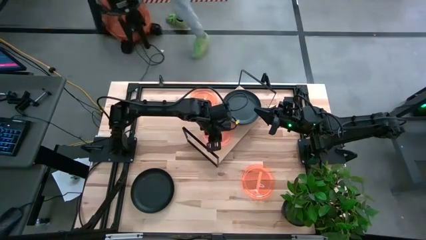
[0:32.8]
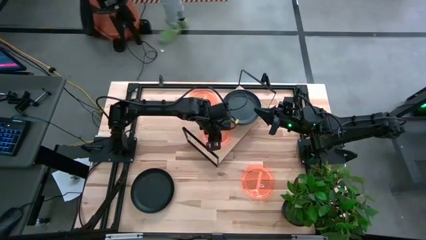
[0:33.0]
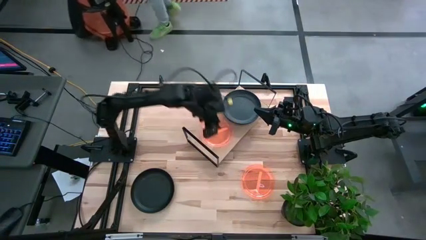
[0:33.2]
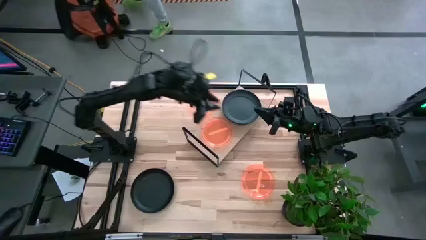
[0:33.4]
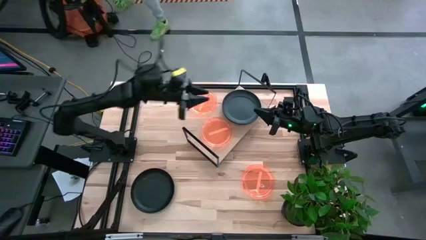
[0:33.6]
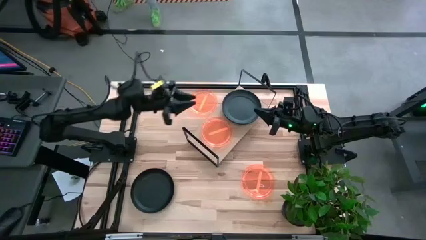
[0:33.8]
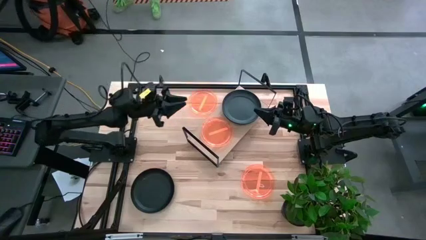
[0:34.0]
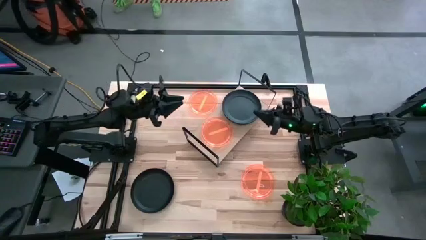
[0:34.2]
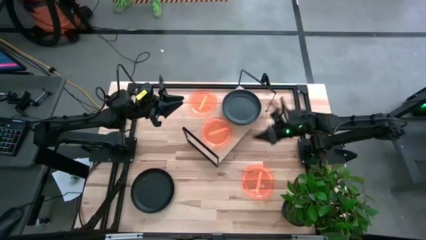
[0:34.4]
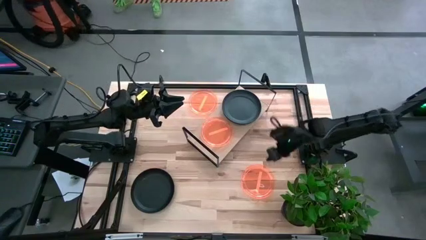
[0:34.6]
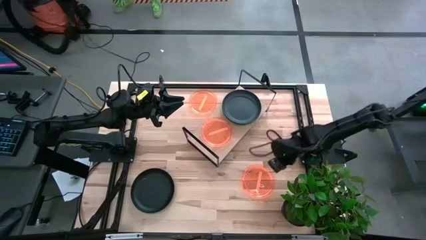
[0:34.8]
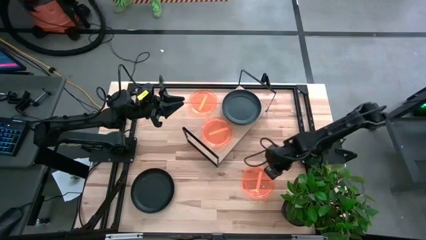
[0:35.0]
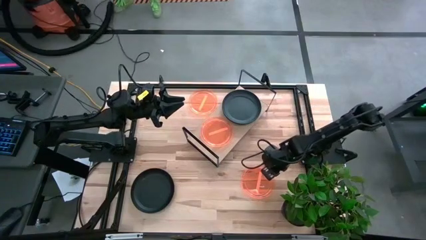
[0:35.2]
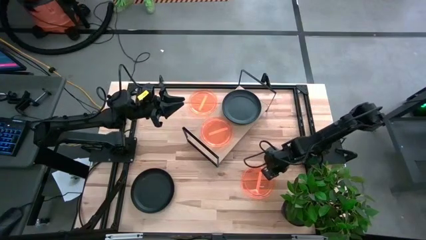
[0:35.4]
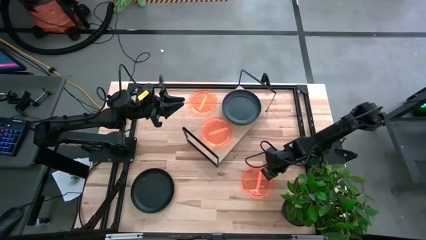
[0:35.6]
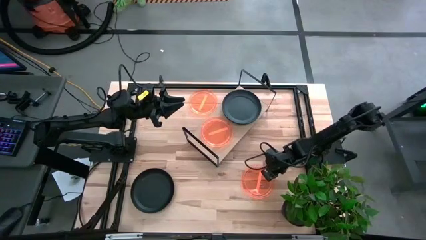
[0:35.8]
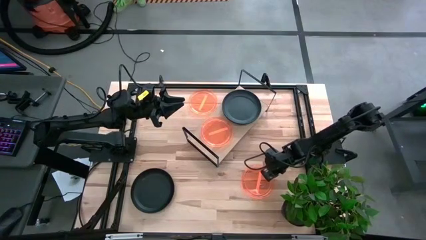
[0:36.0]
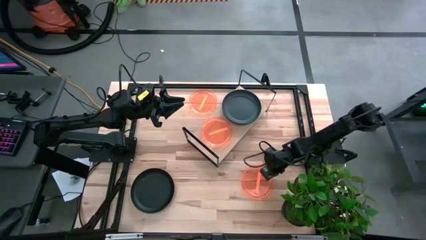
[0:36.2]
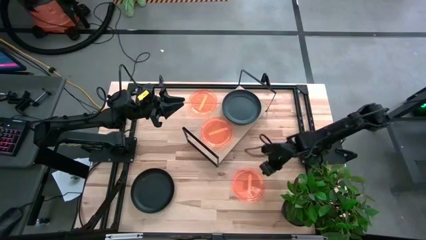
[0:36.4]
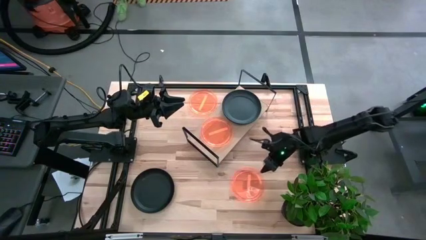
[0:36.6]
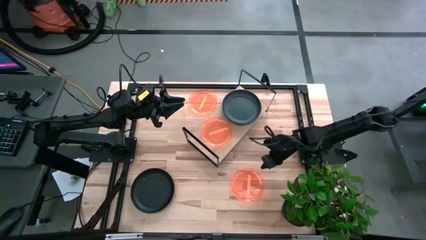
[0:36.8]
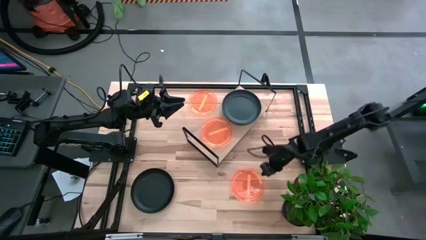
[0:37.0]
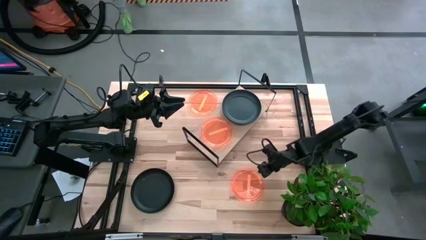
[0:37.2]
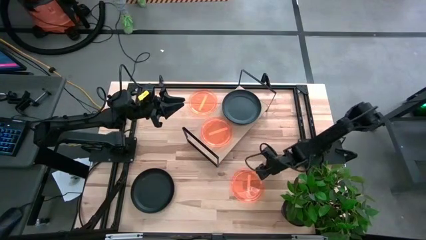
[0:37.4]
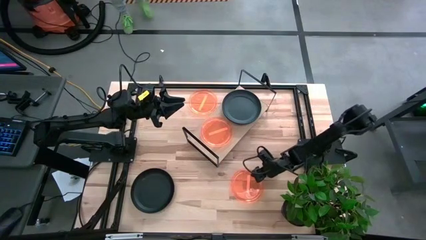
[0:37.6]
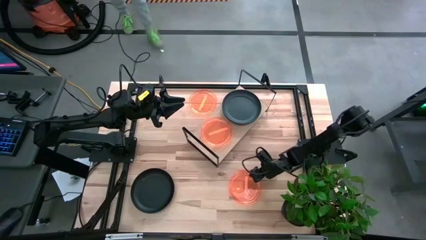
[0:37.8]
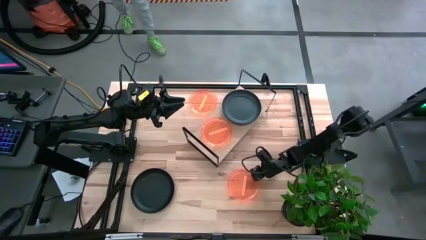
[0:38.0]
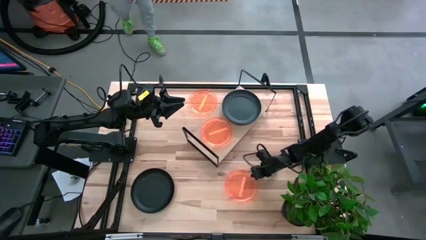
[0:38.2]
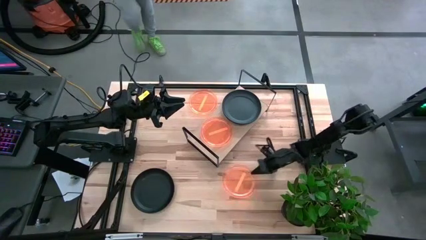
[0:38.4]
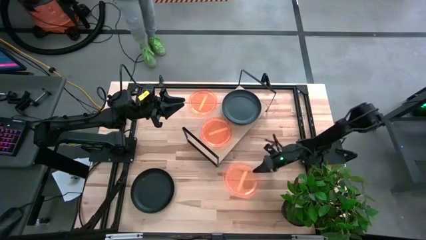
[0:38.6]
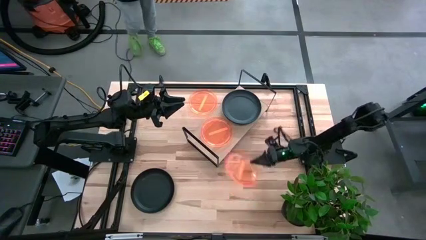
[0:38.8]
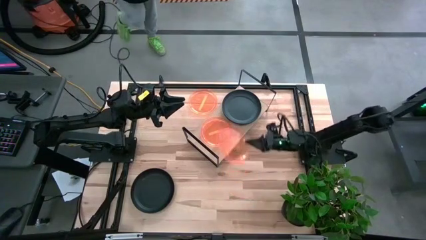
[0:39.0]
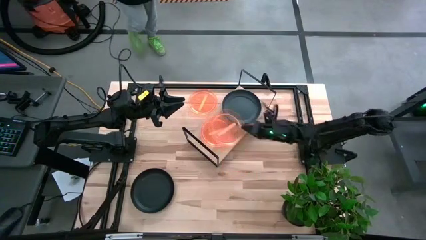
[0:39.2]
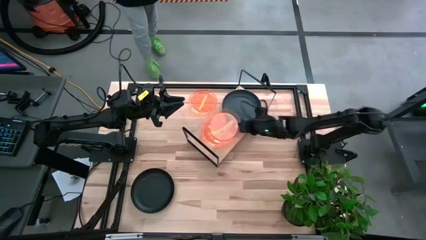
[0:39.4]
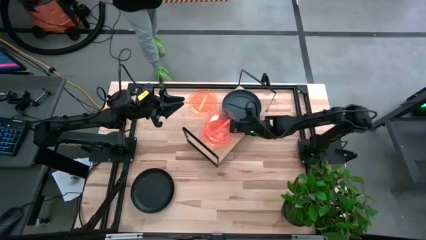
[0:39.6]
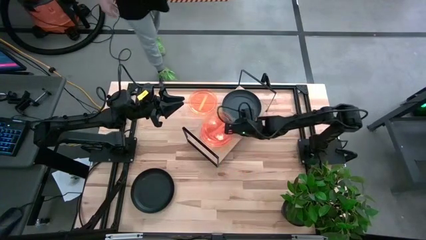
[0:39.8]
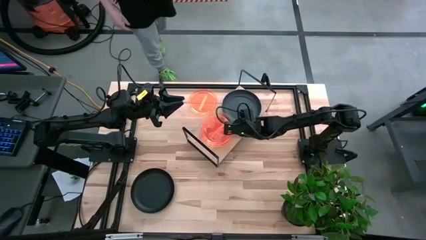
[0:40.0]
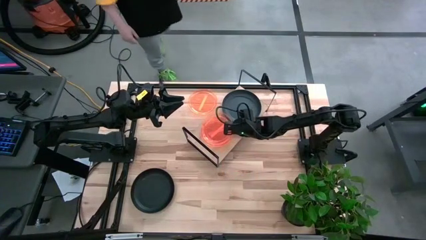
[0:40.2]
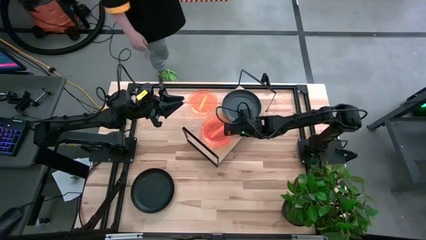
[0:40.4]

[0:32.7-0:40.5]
Task: Place and stack plates onto a shelf
Stack the bottom orange plate on top of the orange plate on the shelf

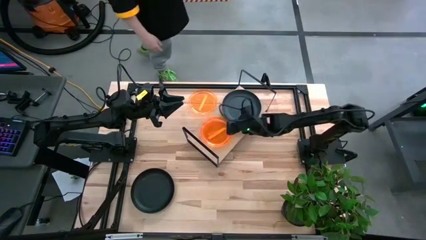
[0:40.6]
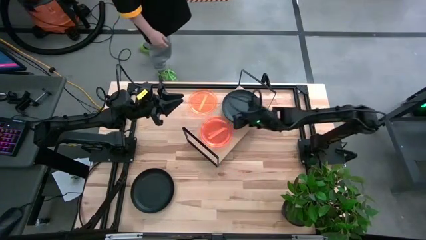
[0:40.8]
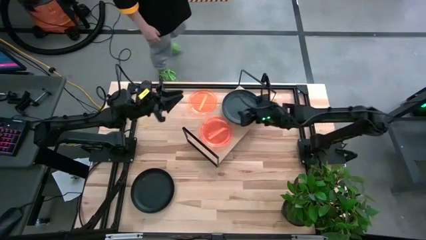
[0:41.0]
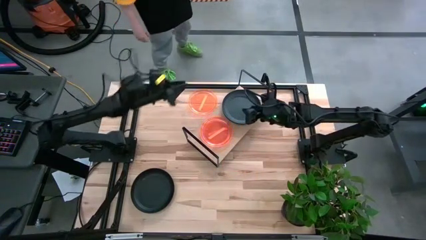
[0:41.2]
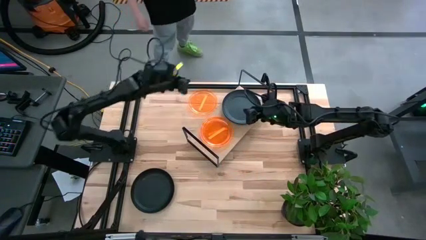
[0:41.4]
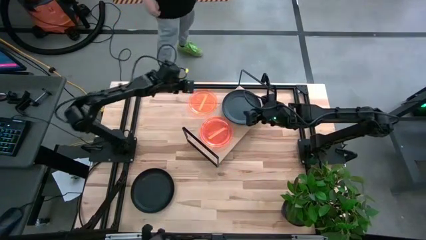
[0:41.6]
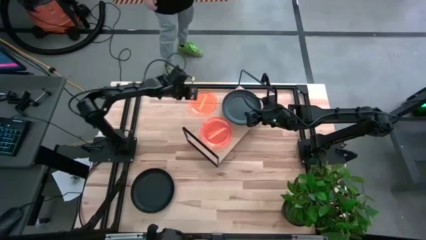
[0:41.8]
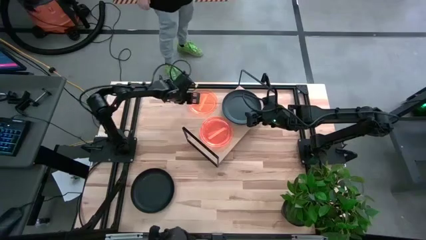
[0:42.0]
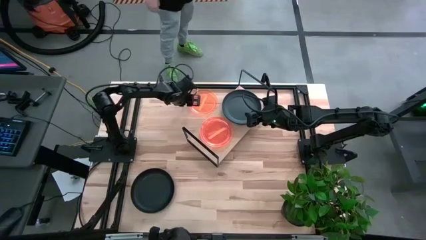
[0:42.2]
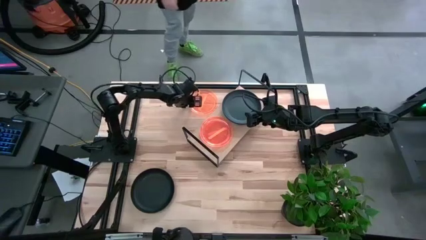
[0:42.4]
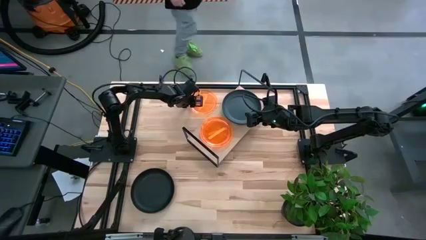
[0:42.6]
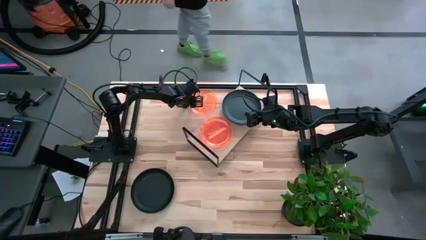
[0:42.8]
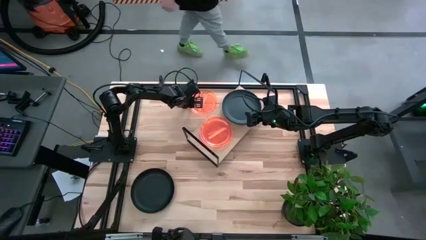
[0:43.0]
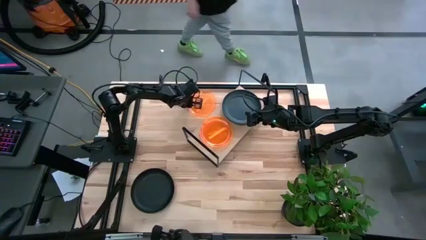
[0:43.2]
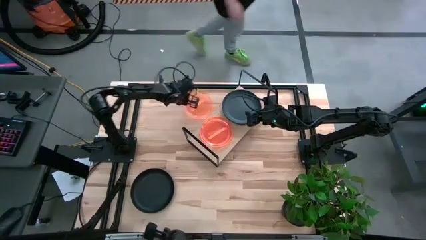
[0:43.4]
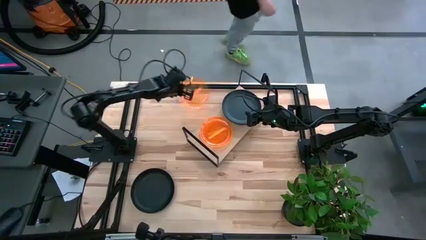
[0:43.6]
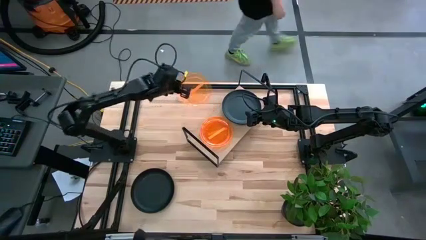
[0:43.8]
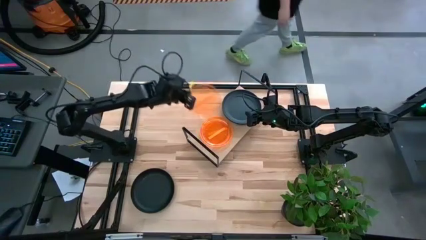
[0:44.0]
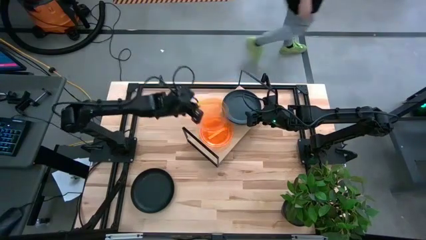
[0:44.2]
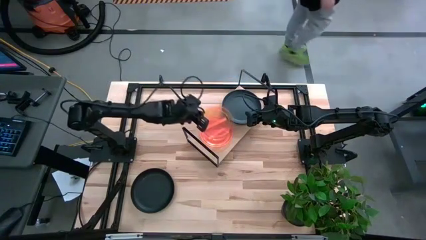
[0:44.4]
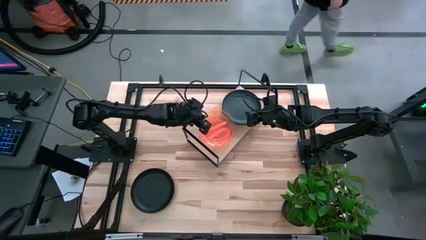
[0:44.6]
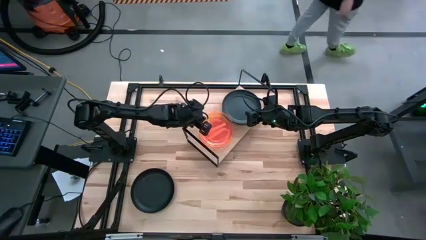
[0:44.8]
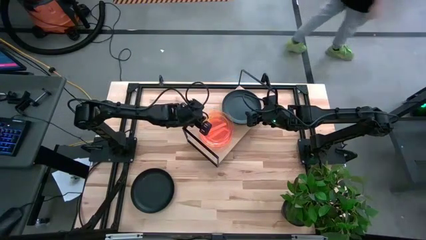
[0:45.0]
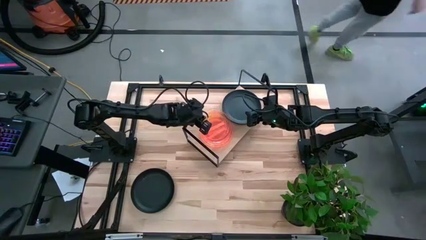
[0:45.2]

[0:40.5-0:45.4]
Stack the orange plate on top of the orange plate on the shelf

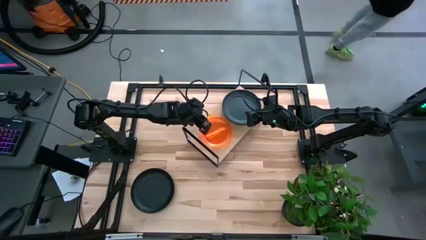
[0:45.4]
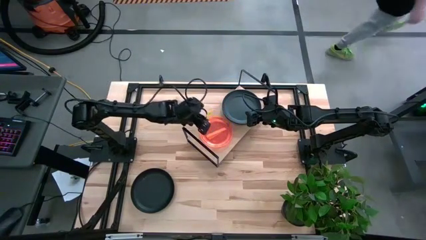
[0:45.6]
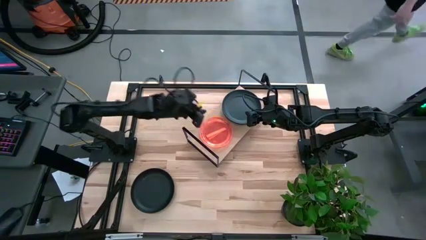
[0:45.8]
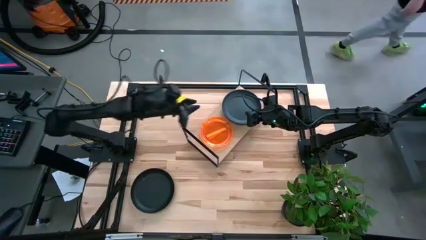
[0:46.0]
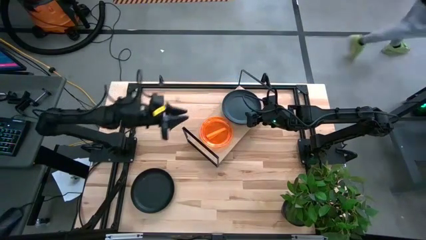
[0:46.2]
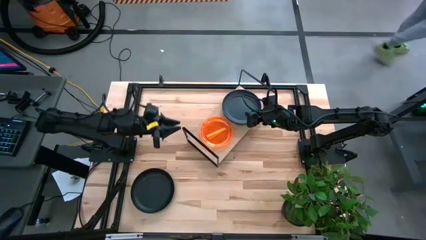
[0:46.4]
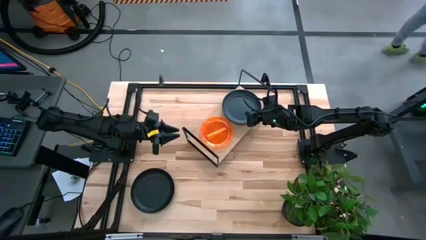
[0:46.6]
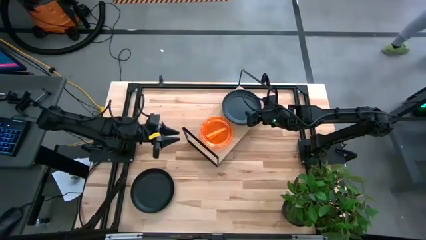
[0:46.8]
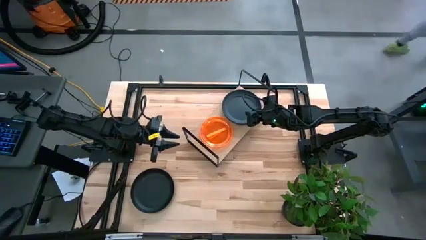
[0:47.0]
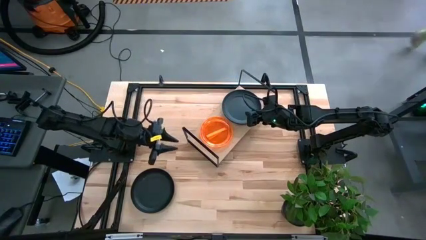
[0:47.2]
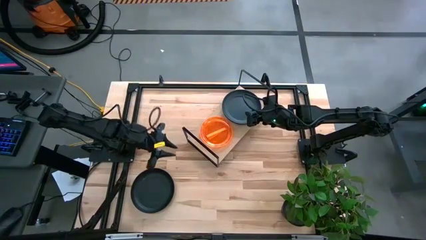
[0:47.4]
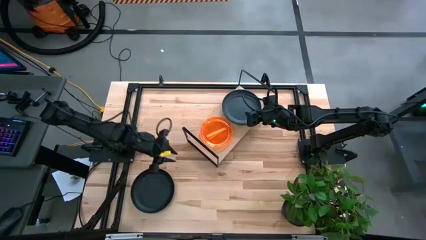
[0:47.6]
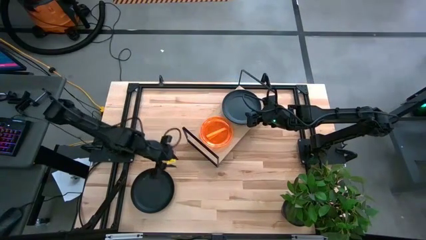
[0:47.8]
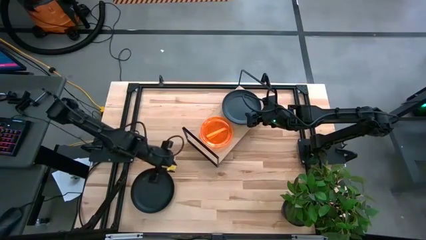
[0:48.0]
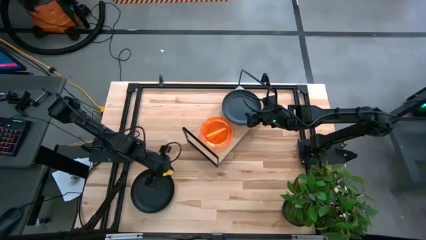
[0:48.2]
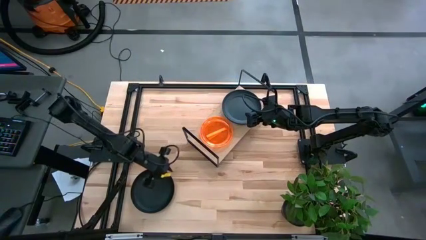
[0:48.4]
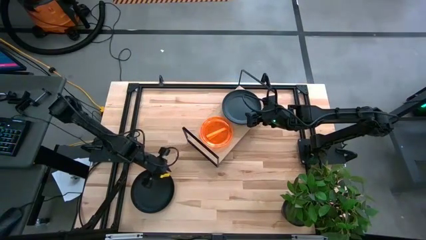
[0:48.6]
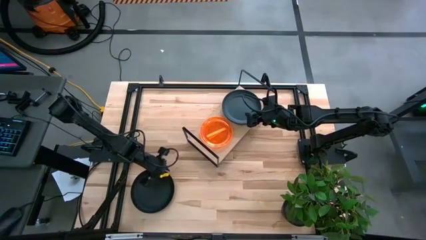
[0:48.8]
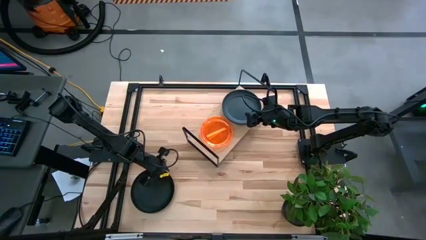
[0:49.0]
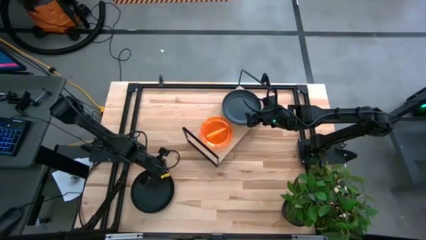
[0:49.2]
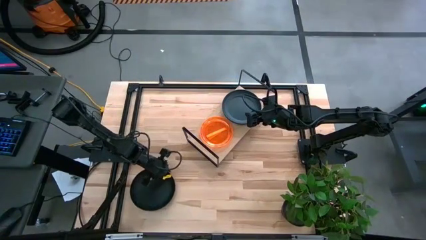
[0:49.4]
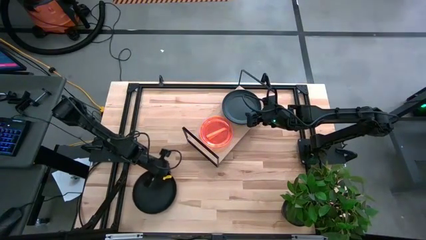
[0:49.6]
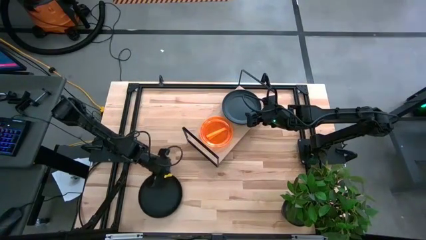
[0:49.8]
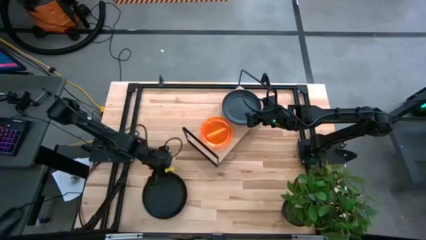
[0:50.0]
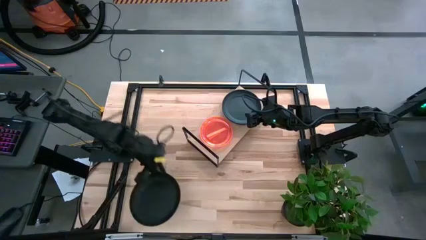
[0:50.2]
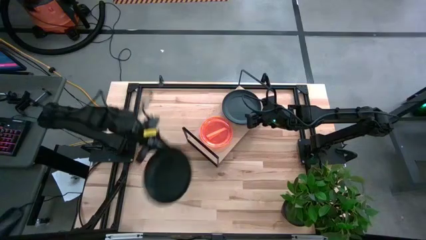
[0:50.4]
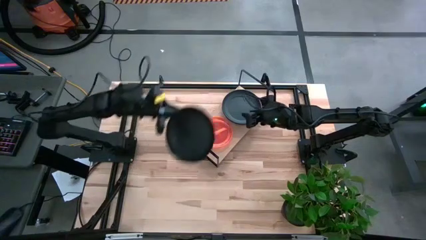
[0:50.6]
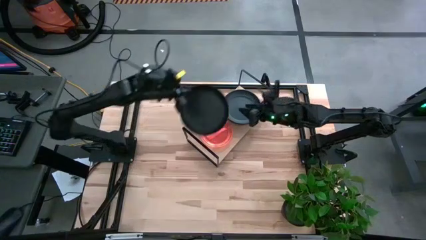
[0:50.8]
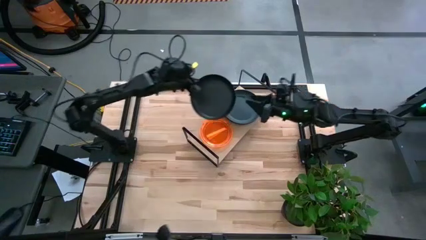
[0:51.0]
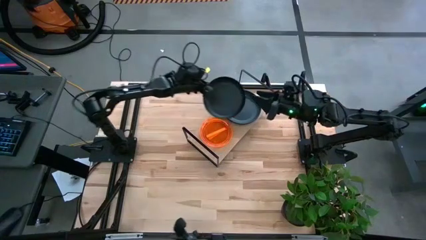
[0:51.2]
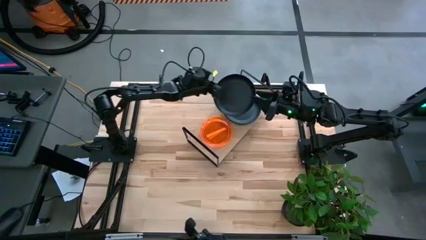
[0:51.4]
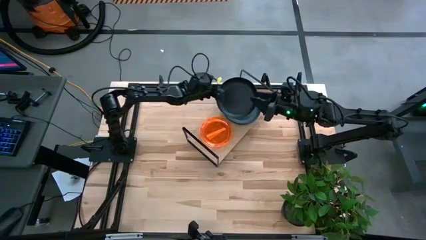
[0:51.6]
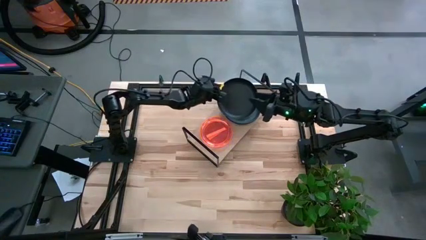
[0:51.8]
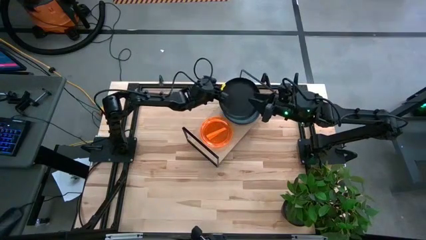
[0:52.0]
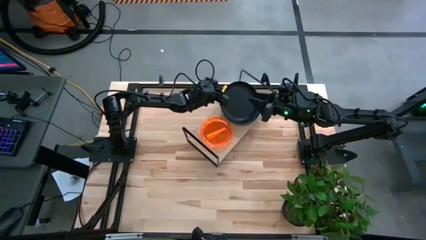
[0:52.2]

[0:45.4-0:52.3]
Stack the black plate on top of the black plate on the shelf
